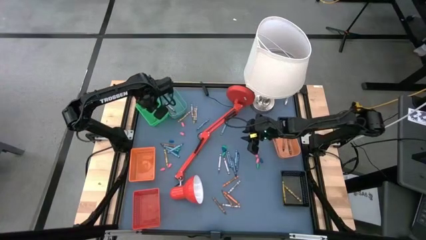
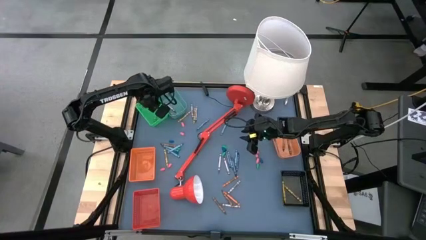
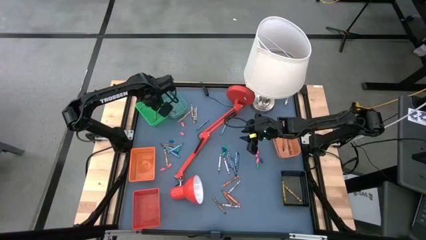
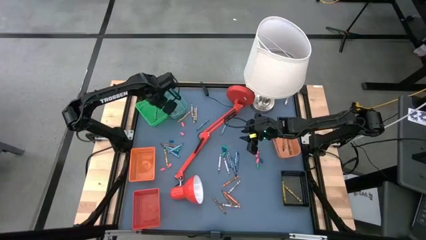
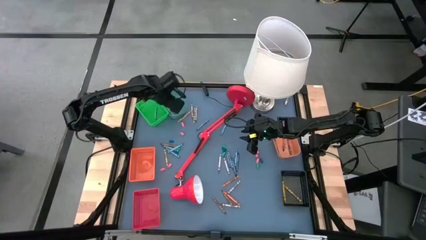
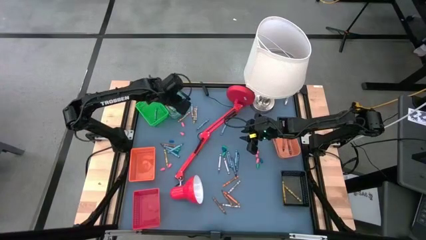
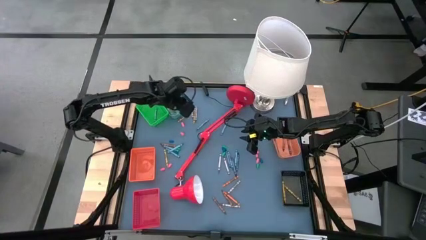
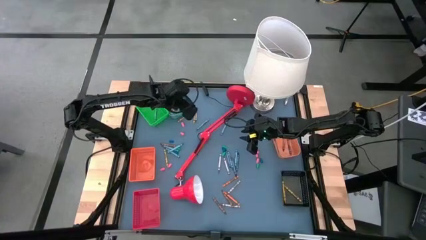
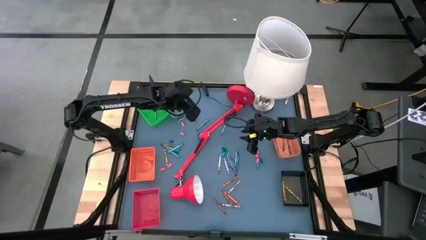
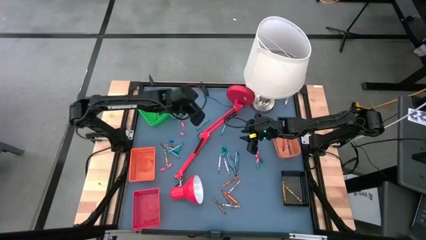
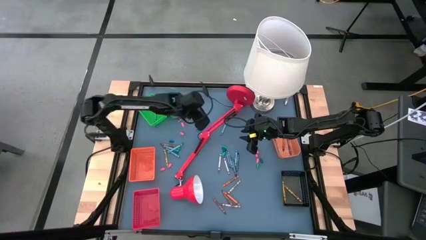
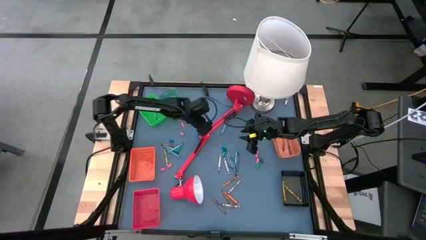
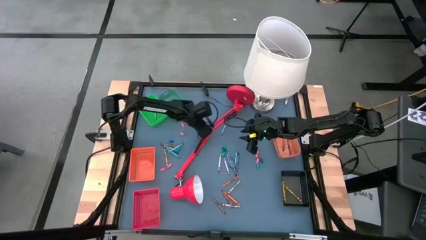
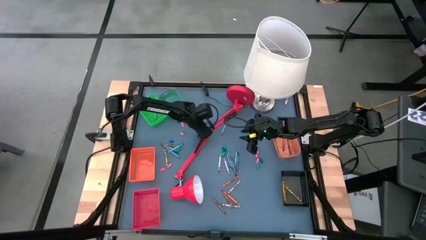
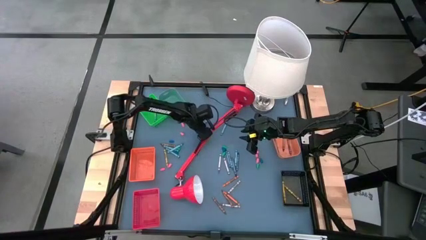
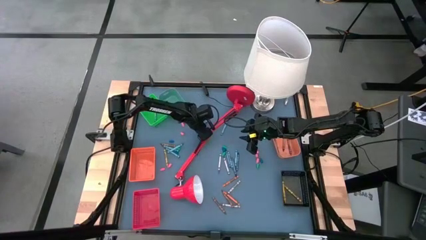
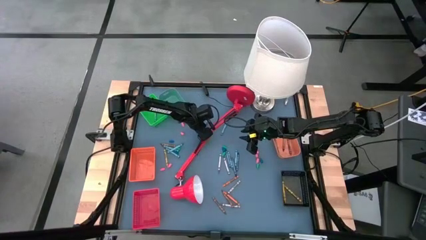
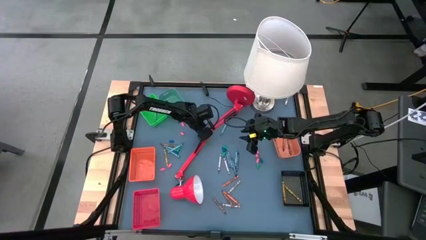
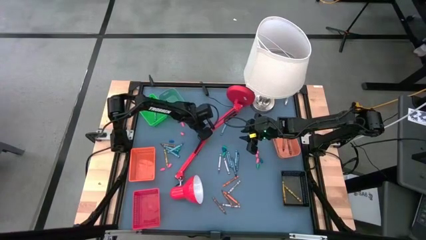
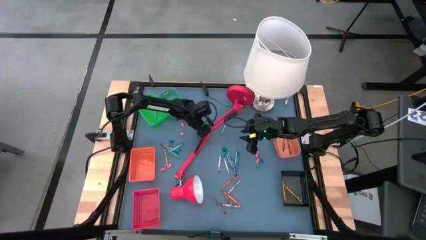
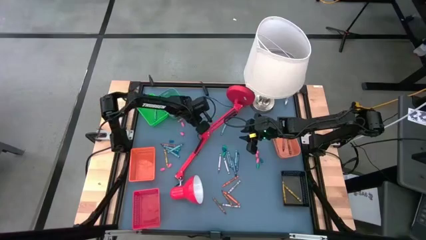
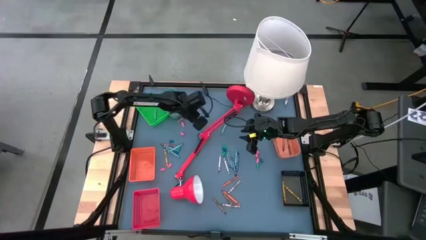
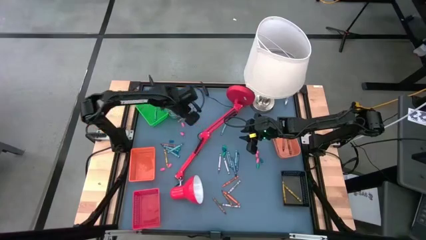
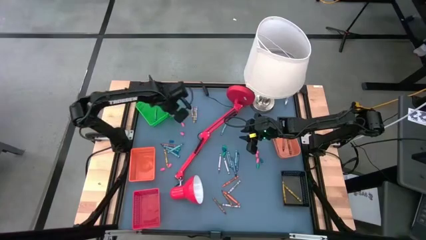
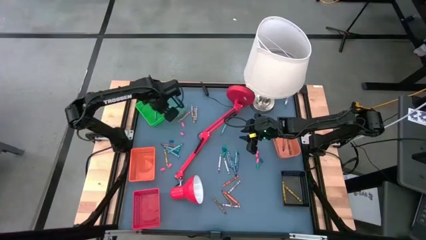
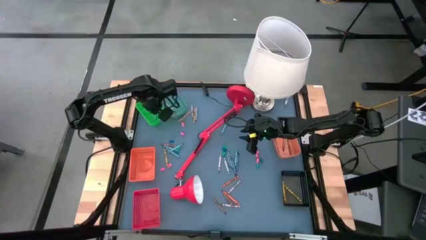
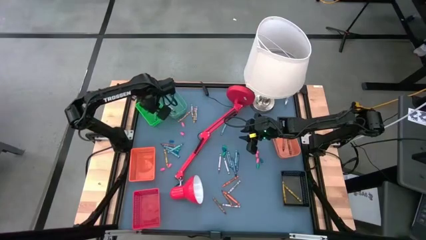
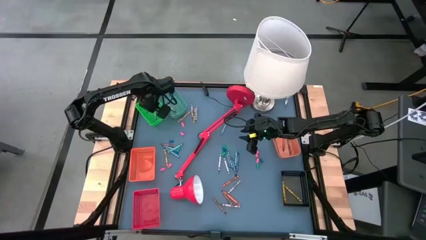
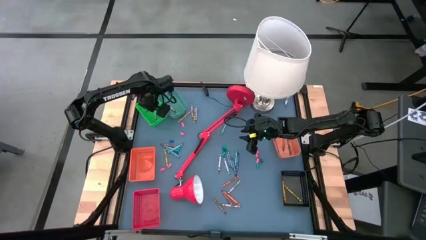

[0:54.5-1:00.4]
Task: Sort crayons
Put the green crayon into the green bin

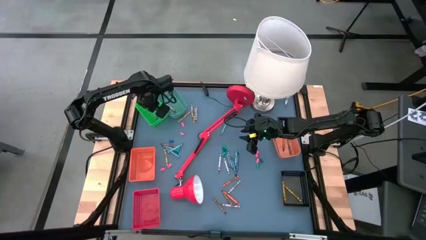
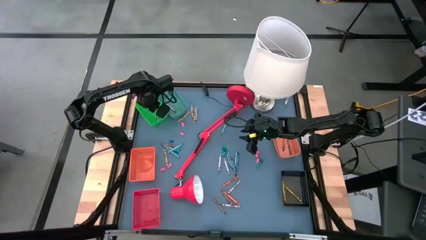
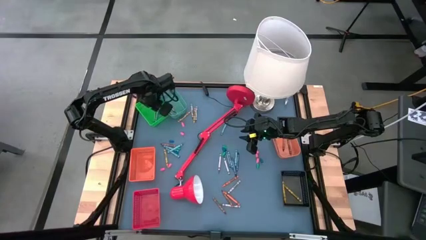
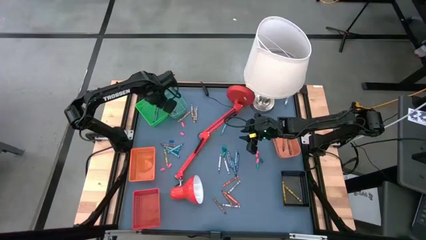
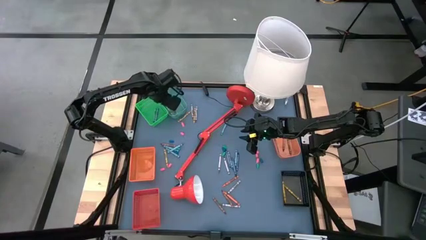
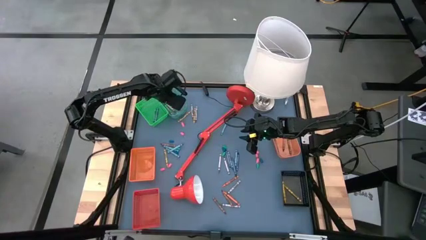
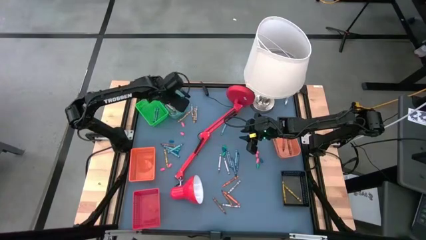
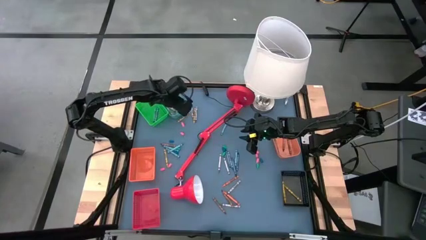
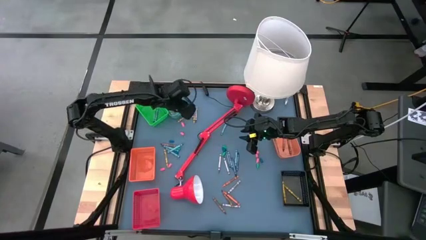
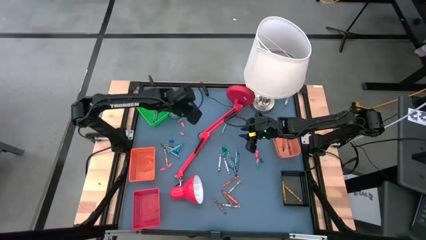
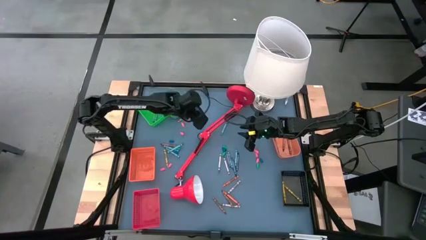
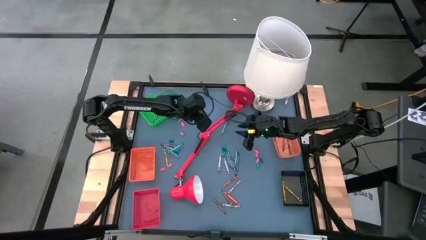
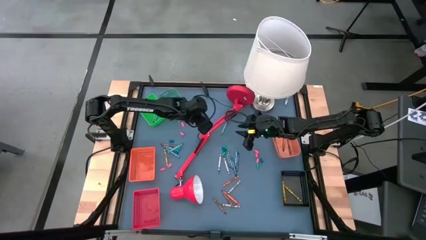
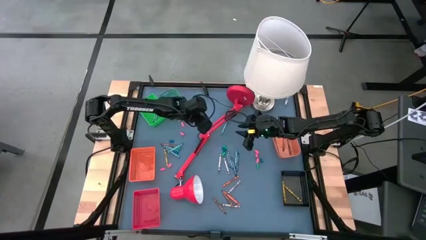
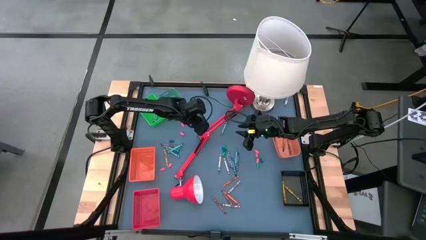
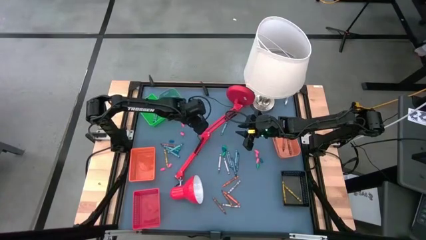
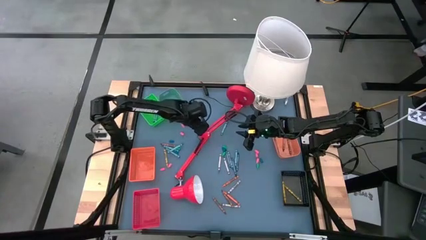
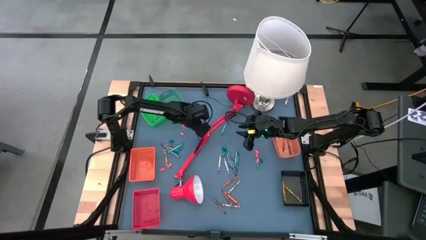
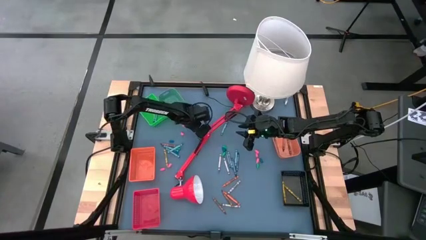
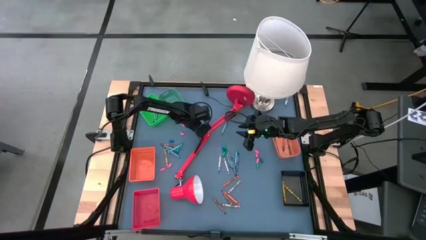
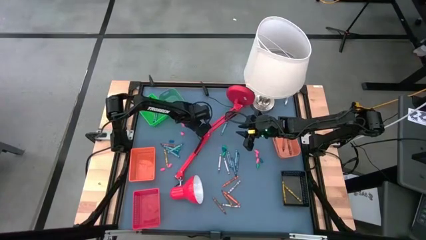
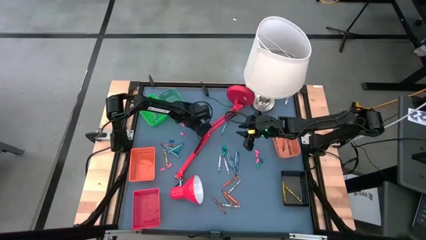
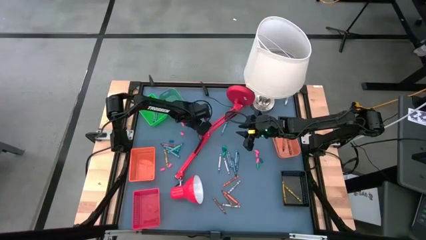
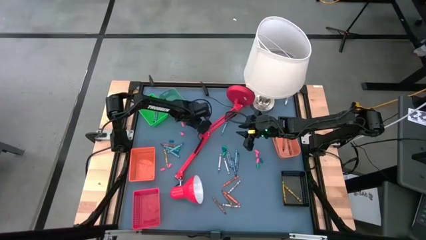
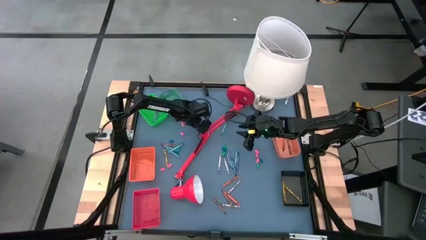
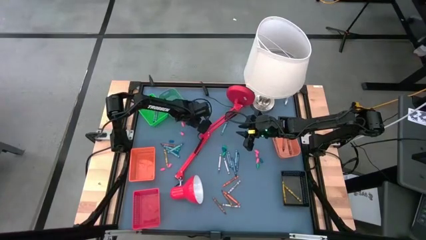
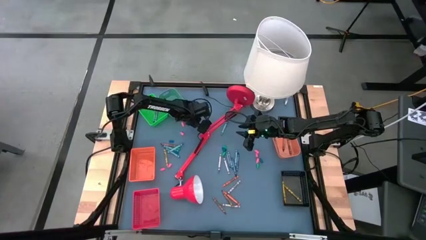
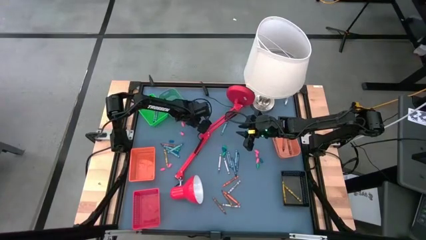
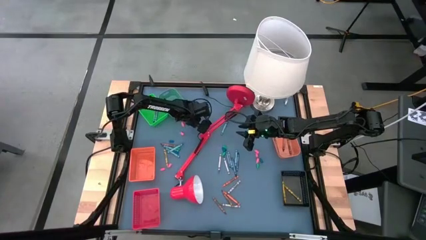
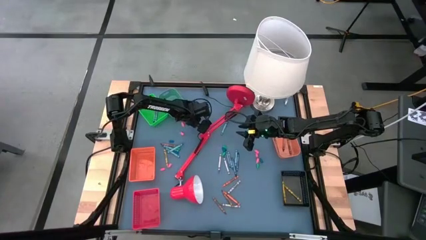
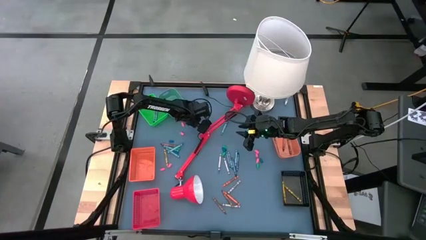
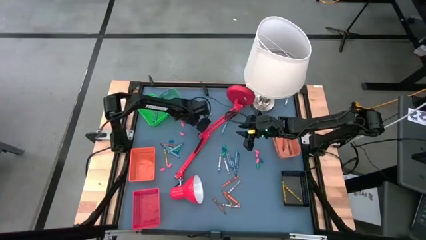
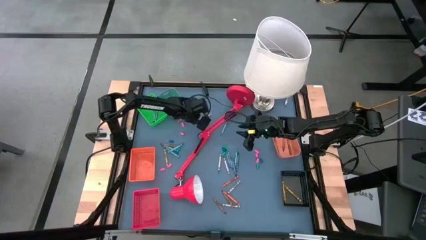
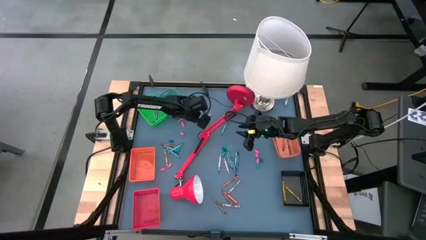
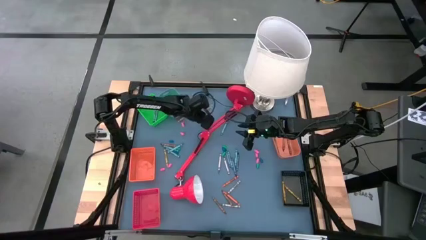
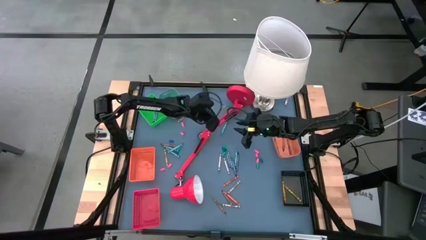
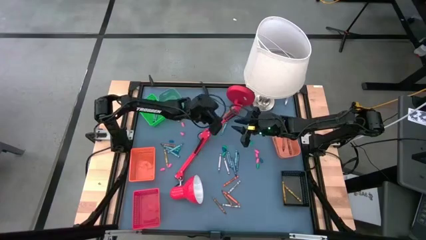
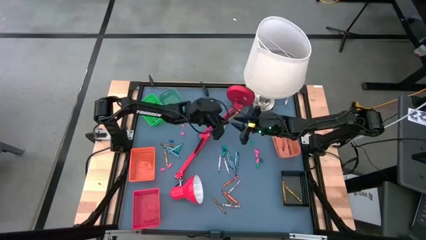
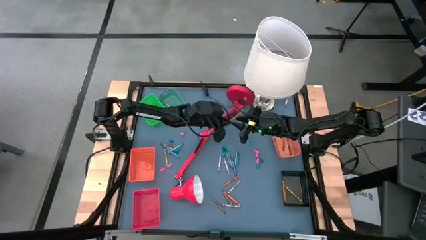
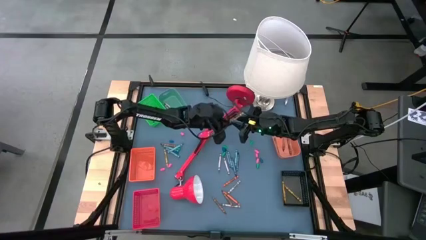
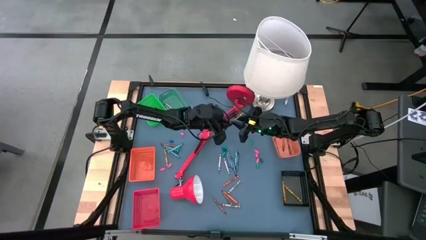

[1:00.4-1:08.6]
Put the green crayon into the green bin

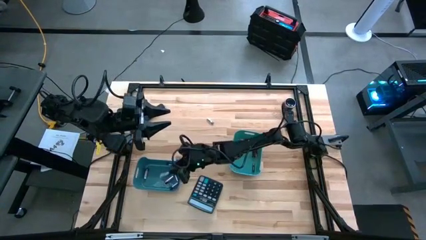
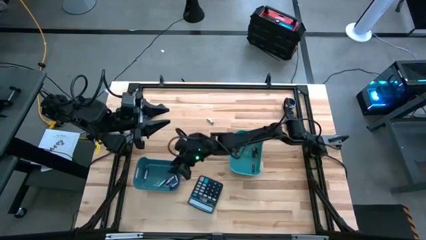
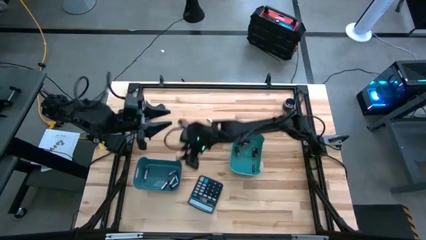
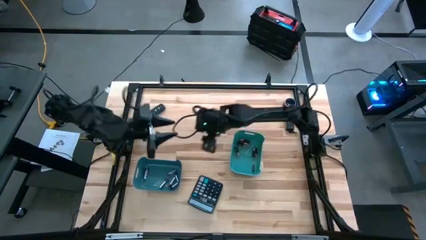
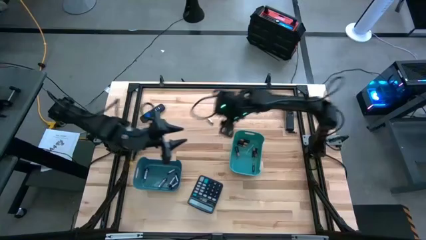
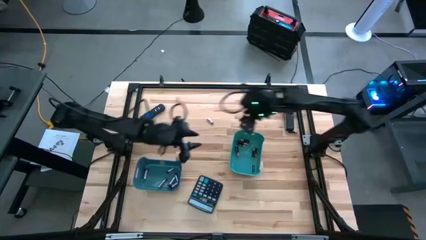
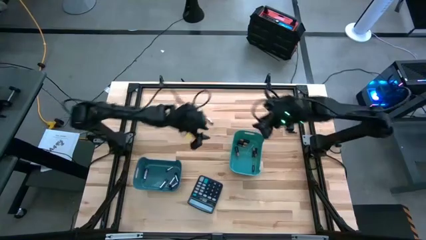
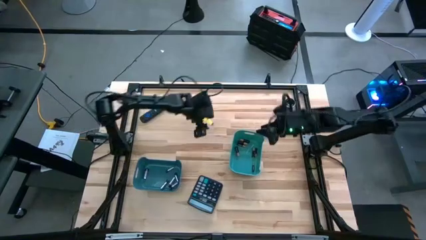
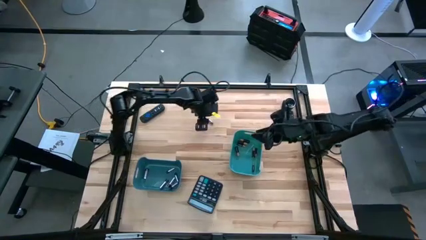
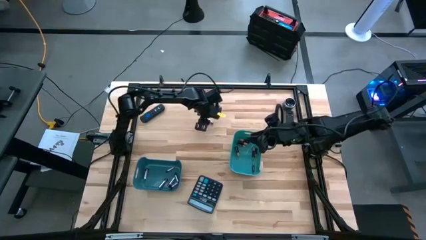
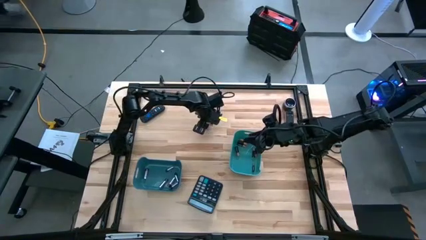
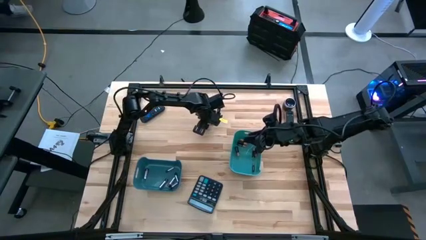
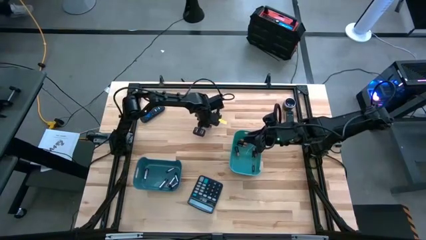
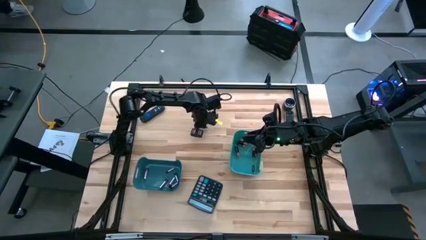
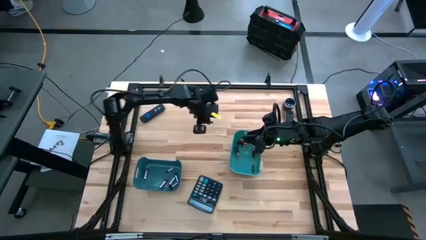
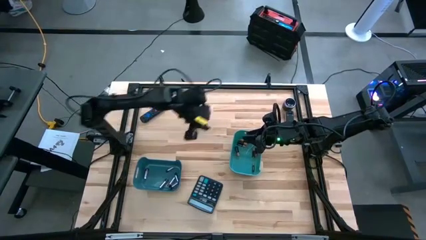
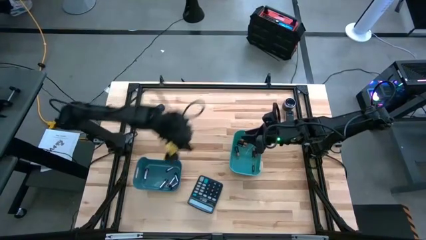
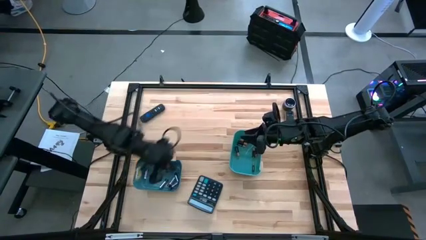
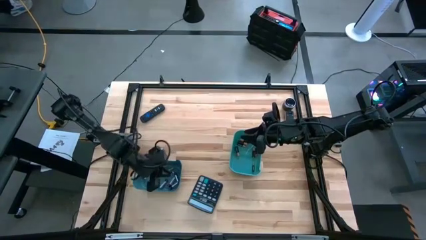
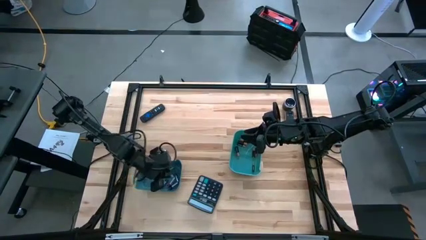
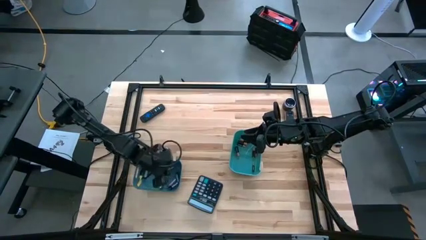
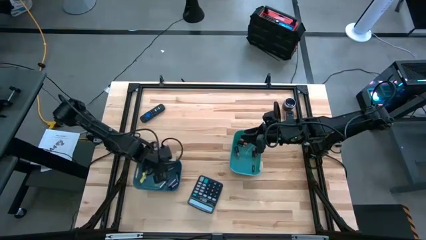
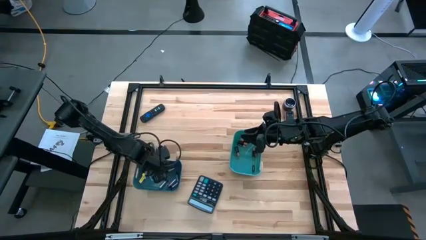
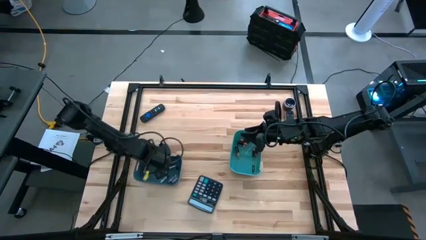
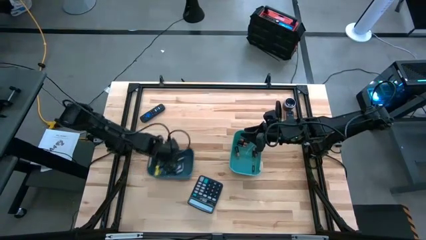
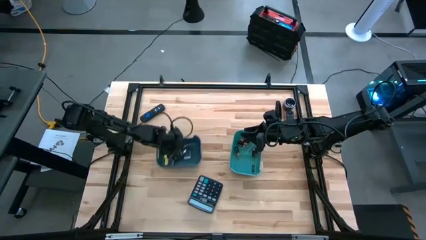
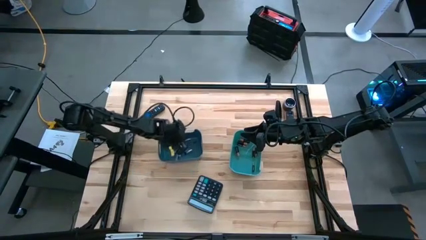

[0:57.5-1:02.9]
Task: Sort batteries
Put the silver battery into the dark blue bin
